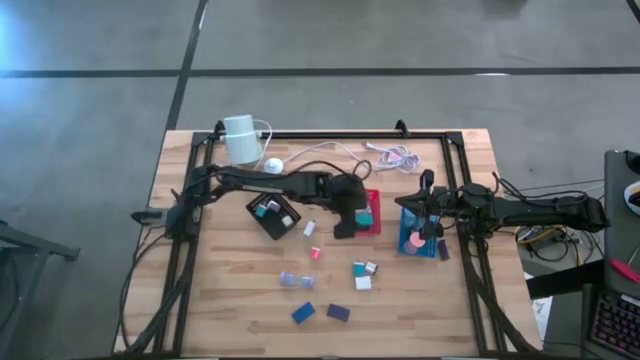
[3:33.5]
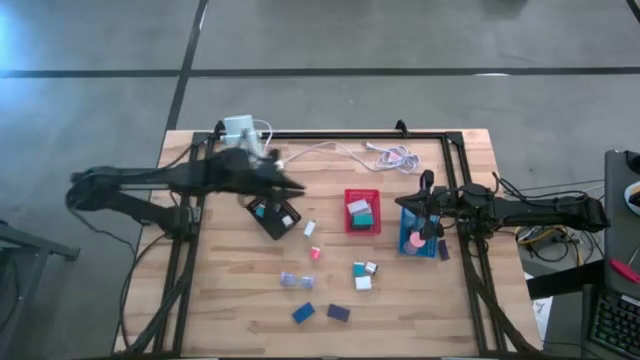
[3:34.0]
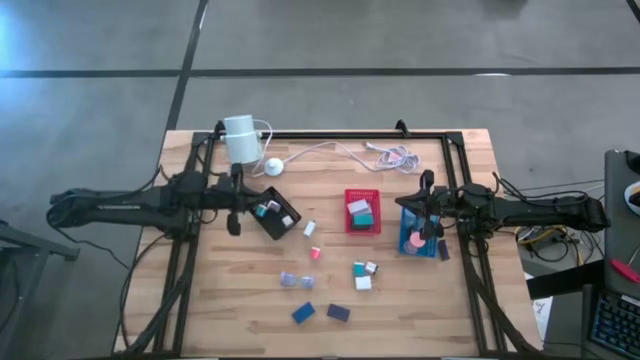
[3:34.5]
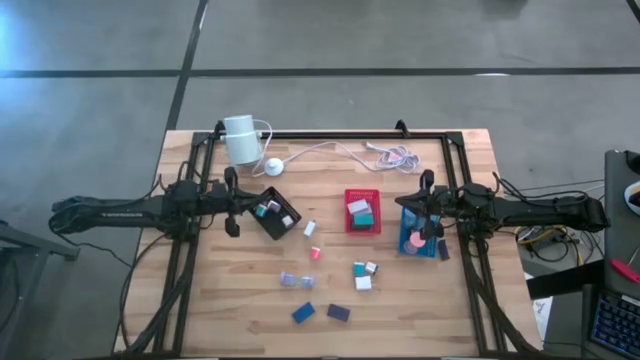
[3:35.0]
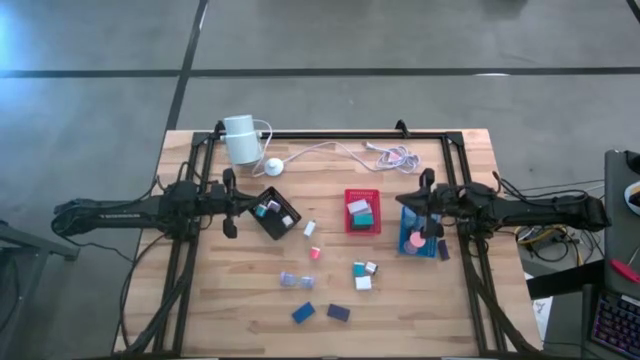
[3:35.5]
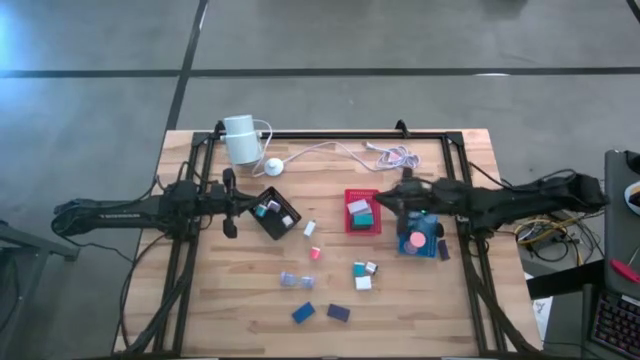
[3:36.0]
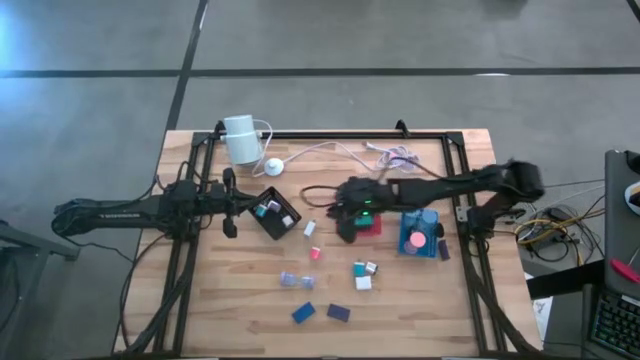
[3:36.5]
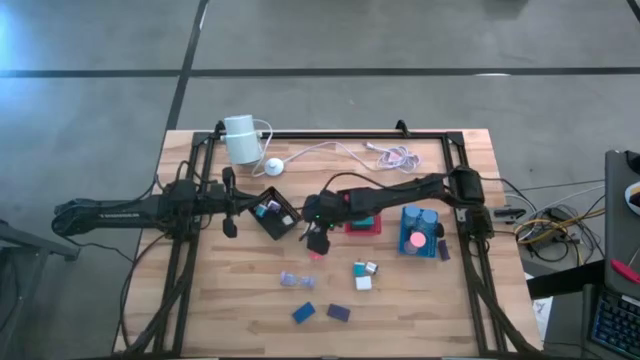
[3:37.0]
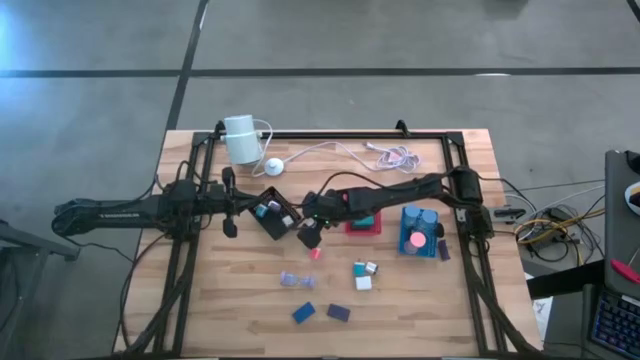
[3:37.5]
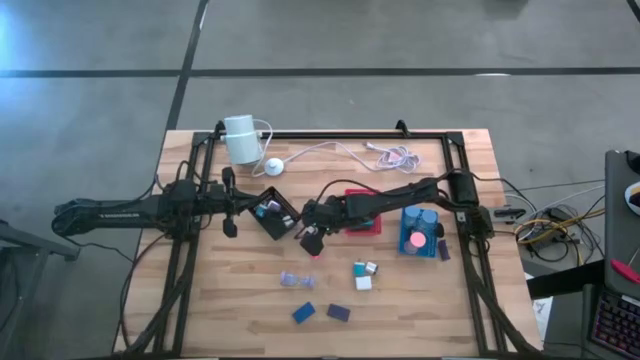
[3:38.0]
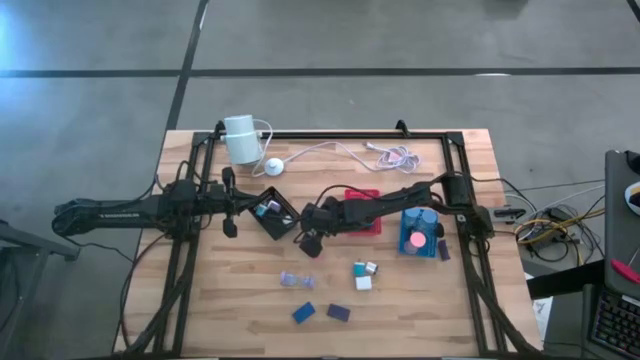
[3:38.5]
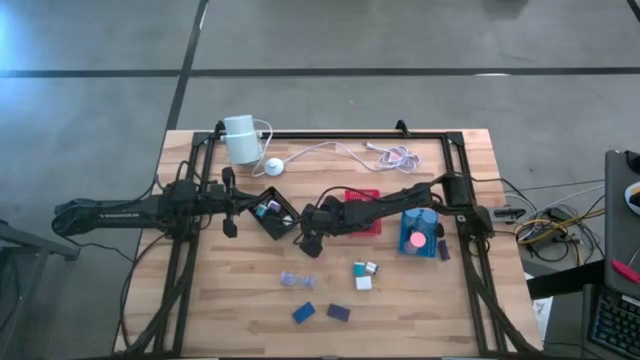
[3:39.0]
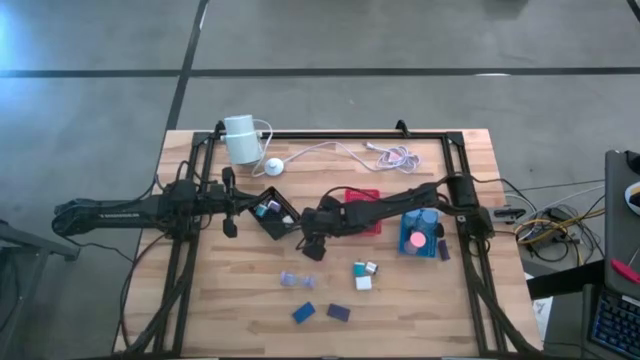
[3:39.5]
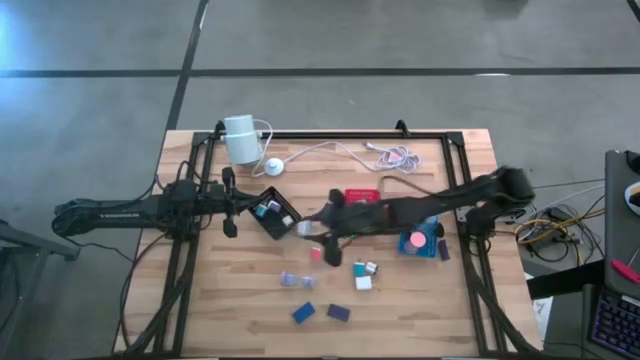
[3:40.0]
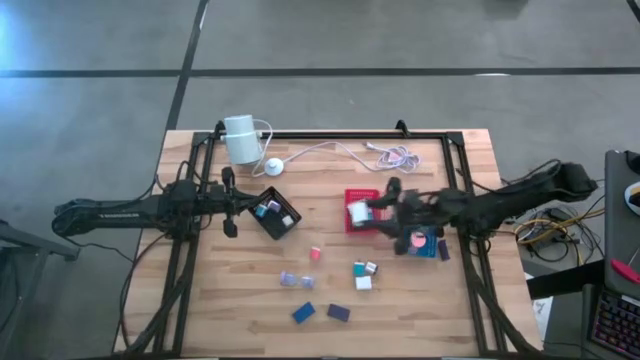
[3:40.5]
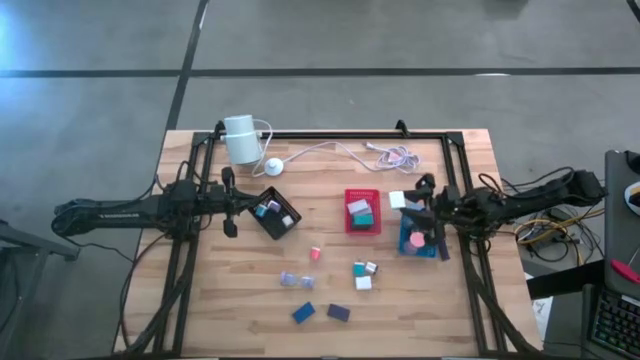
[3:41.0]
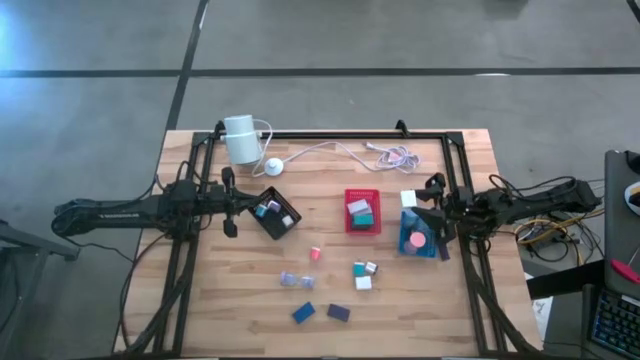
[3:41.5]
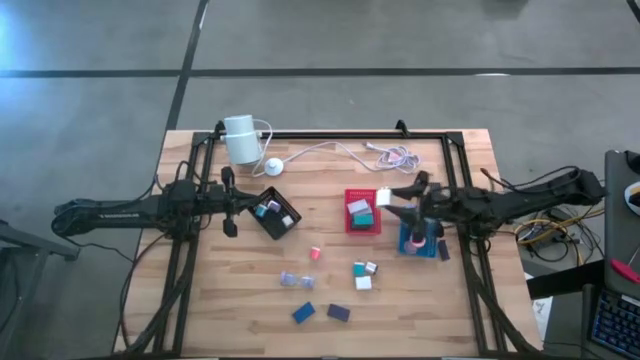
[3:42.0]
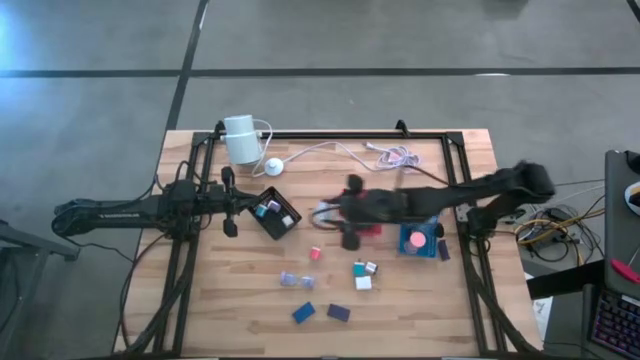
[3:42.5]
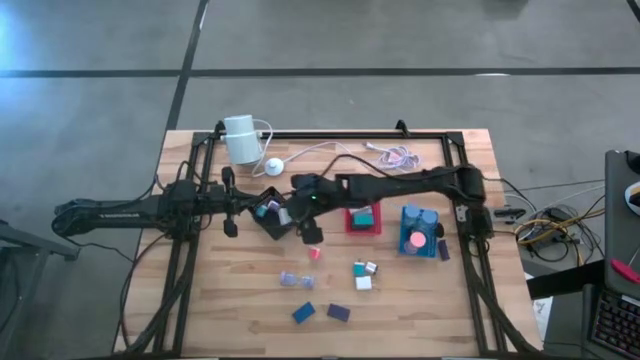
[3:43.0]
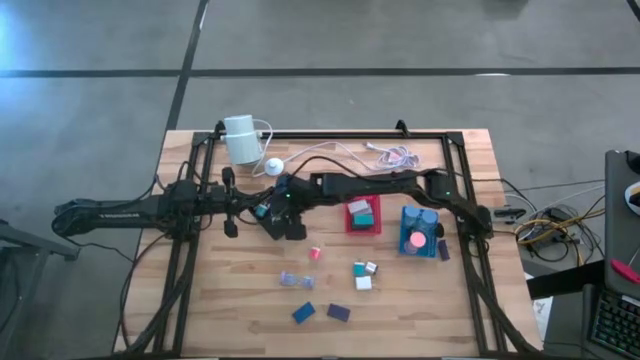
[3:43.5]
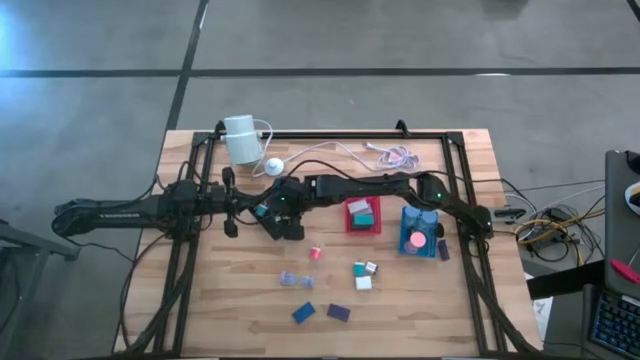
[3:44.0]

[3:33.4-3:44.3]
Task: Pick & Place Office items
Put the top white charger adaptor into the black bin

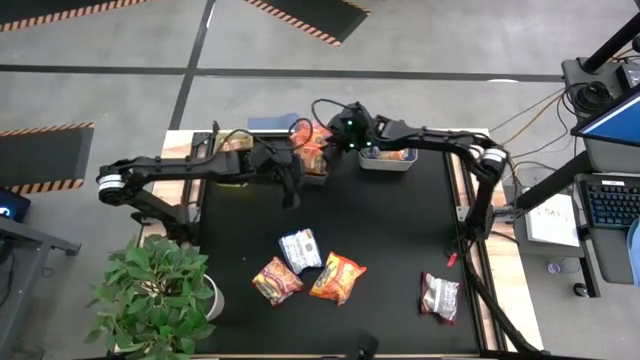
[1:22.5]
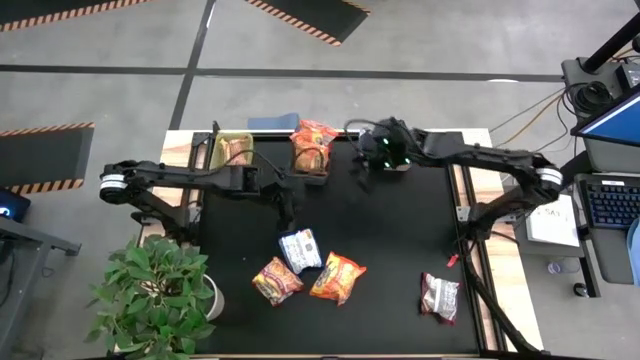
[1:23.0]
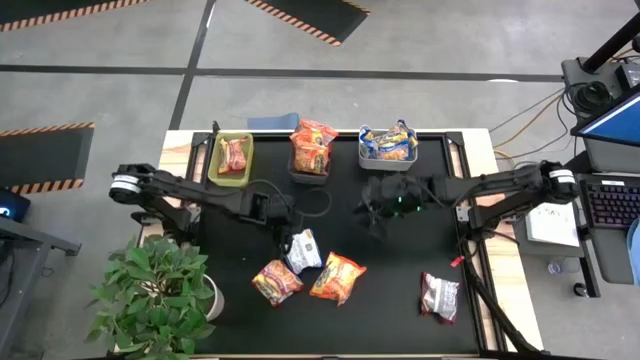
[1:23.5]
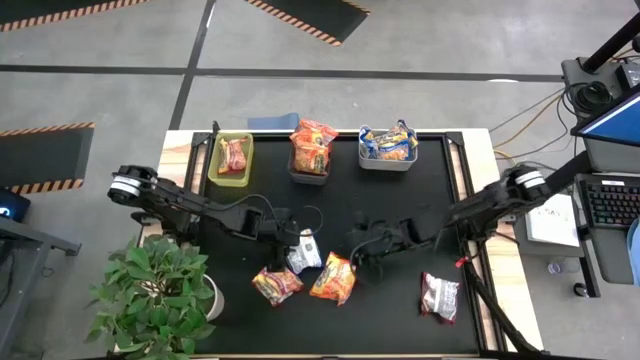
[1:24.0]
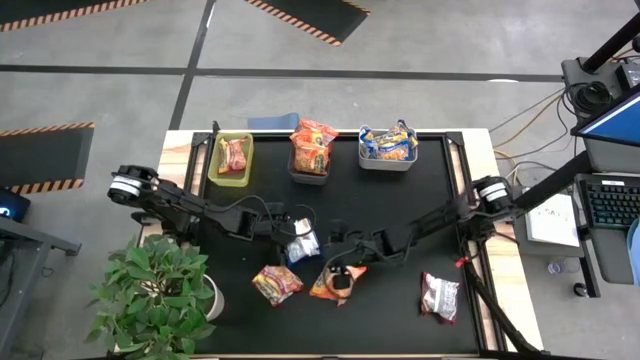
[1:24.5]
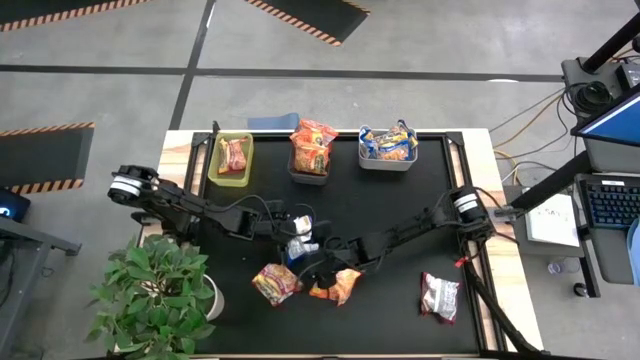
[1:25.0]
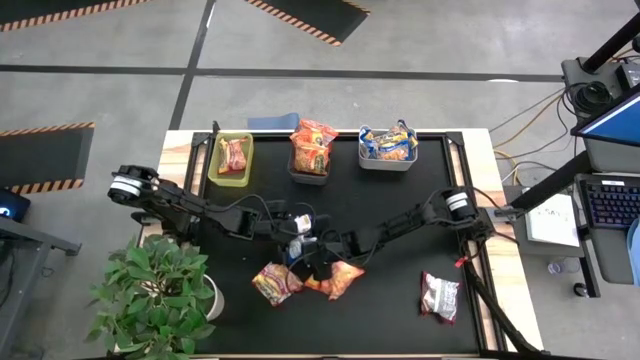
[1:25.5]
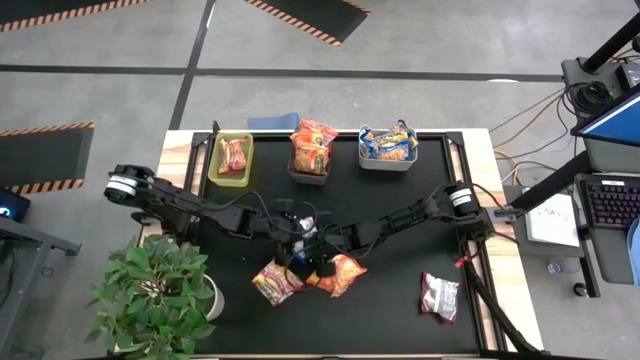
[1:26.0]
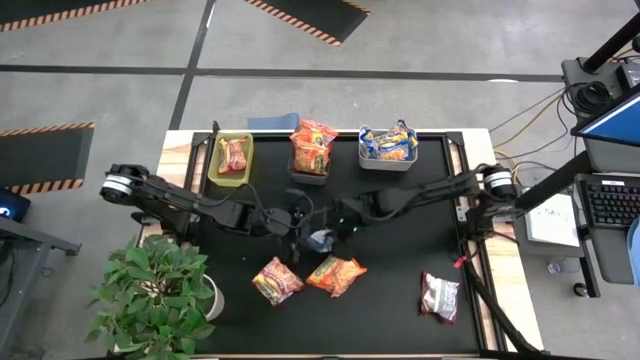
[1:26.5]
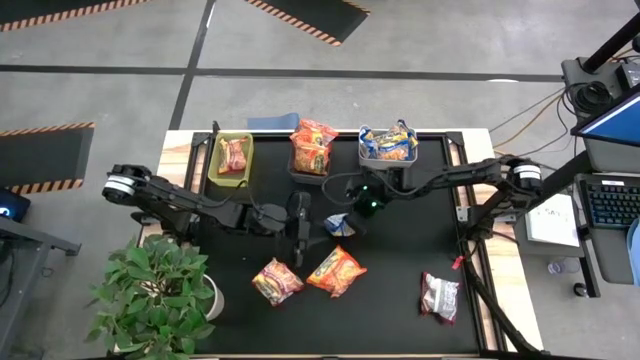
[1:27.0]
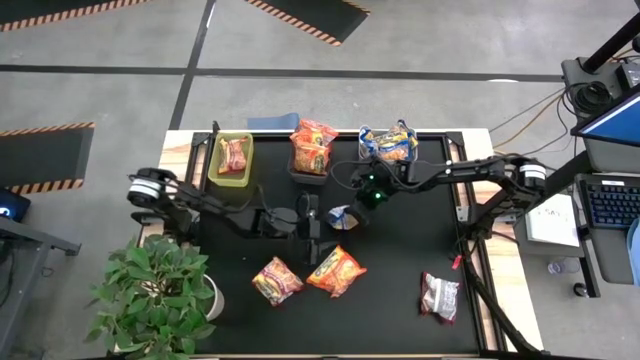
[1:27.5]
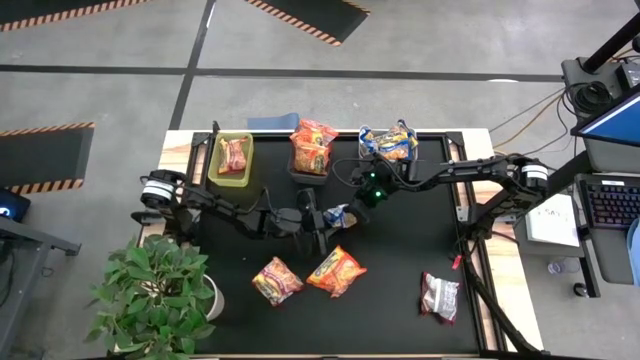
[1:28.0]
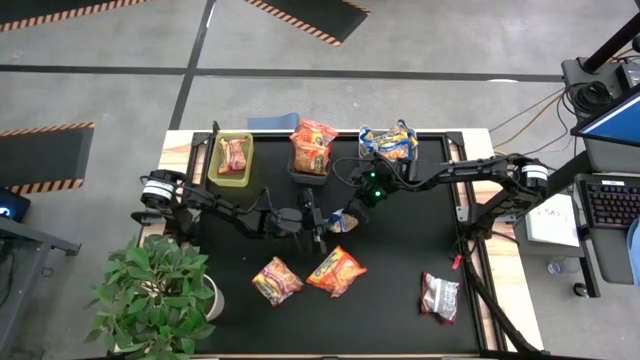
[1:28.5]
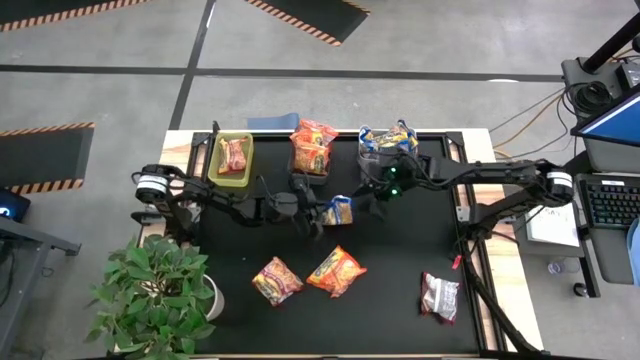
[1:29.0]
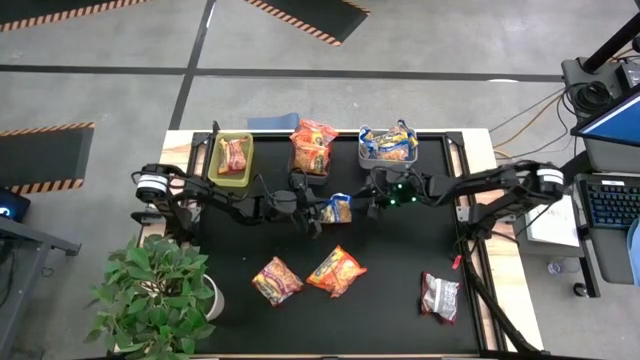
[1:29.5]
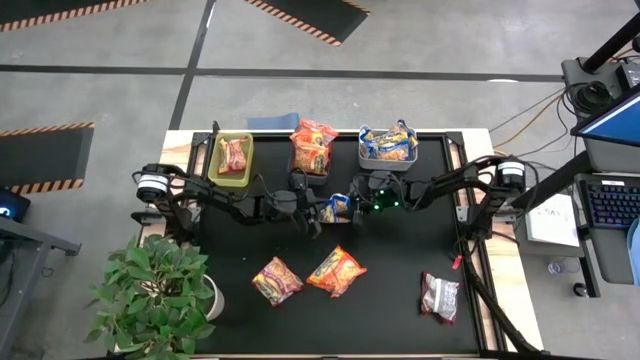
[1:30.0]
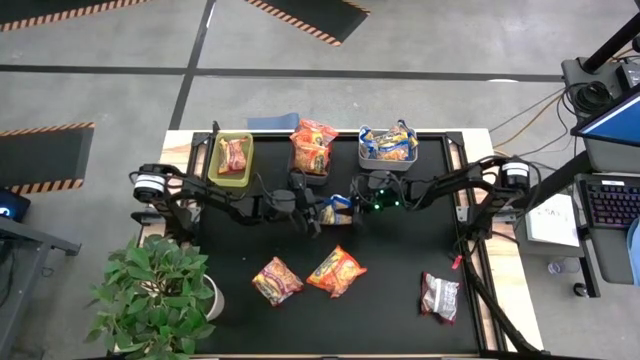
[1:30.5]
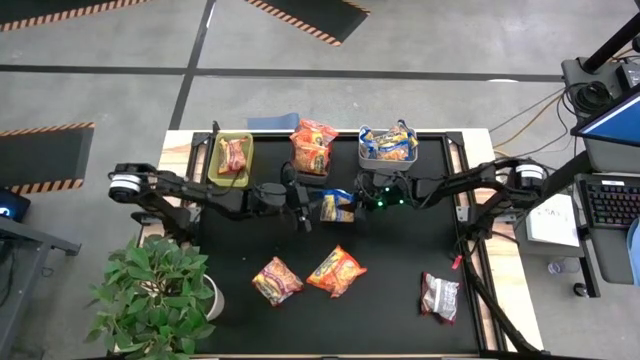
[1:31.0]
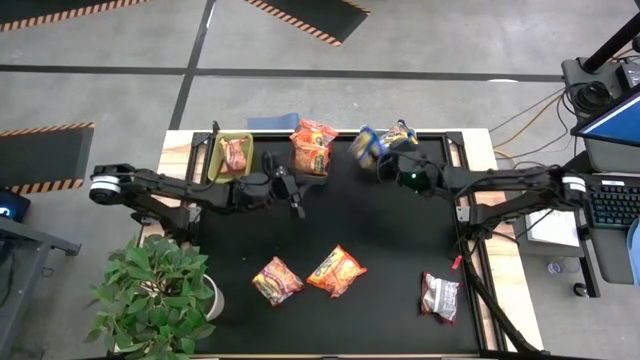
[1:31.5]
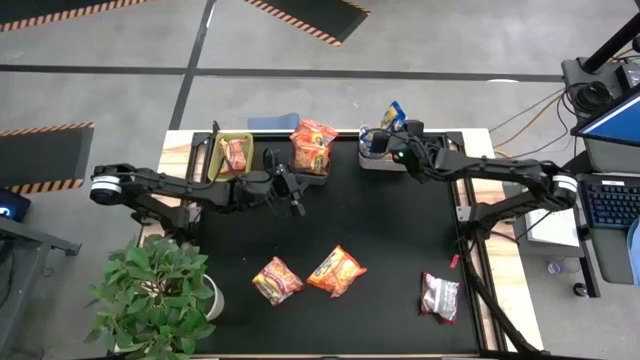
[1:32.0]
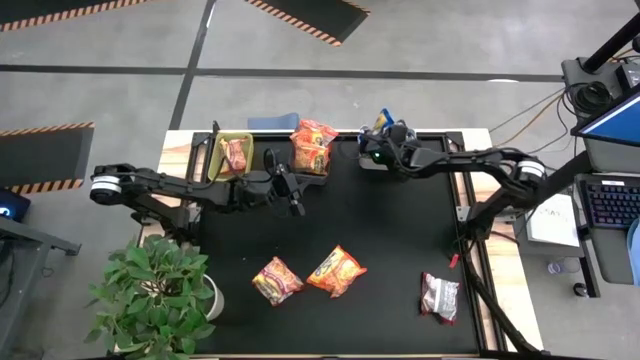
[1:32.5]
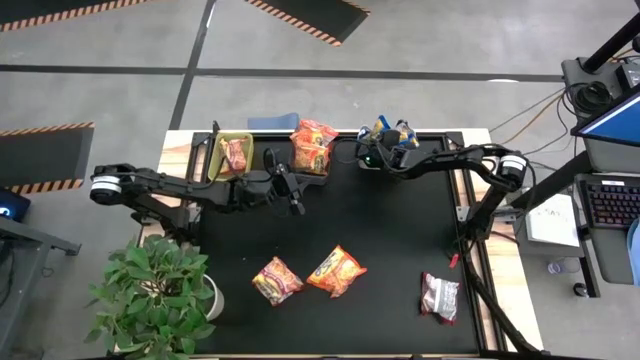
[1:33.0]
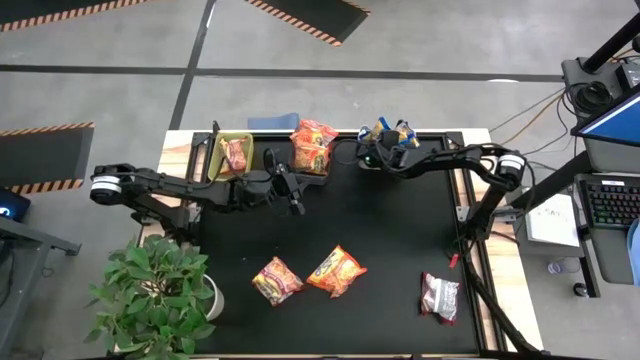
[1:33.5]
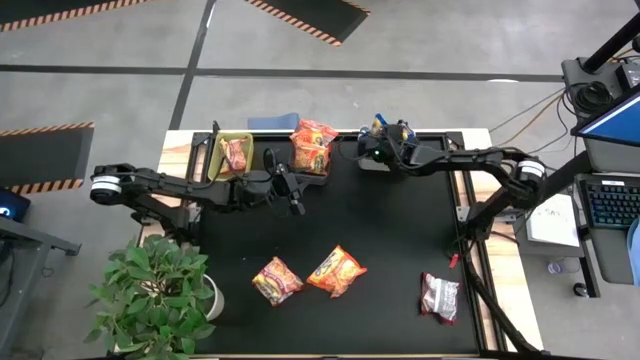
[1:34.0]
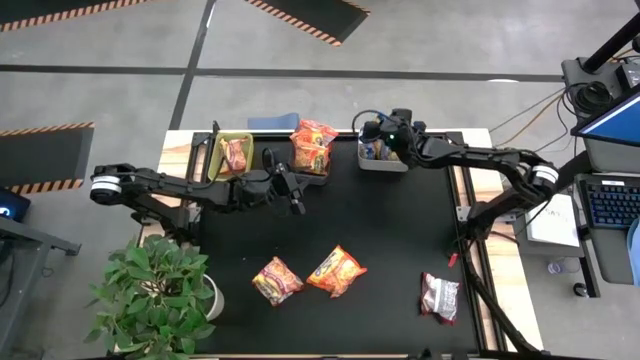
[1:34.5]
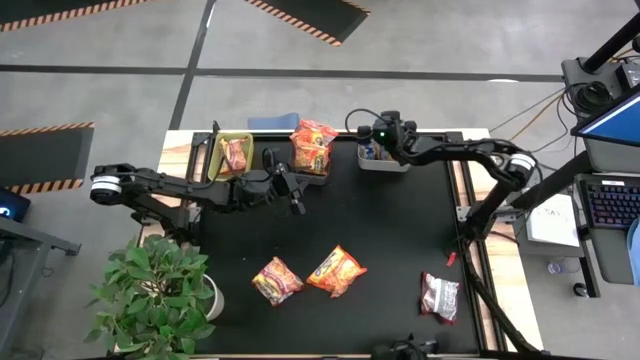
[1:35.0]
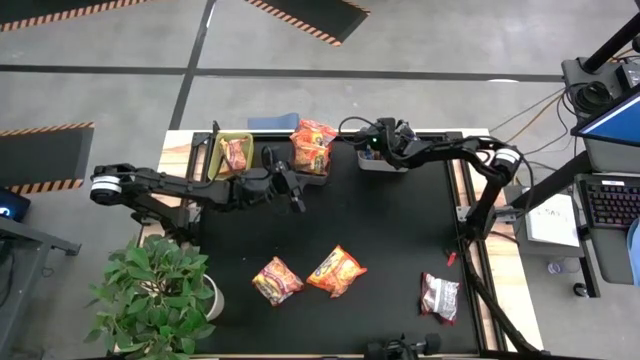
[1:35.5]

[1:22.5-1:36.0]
Task: Sort Maruchan noodles
Put the blue noodle pack into the white bin
